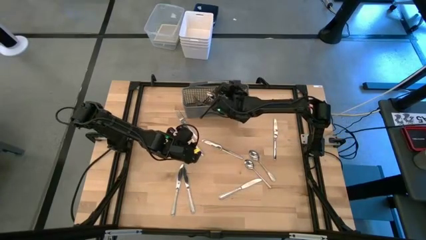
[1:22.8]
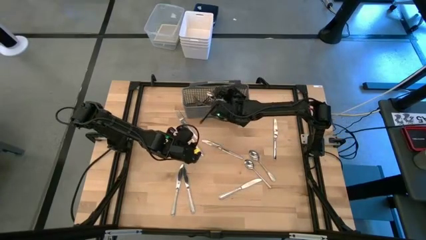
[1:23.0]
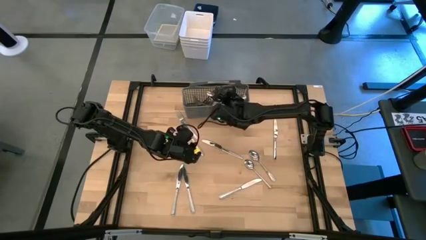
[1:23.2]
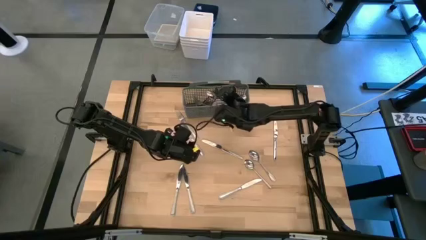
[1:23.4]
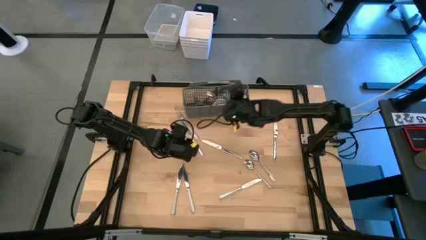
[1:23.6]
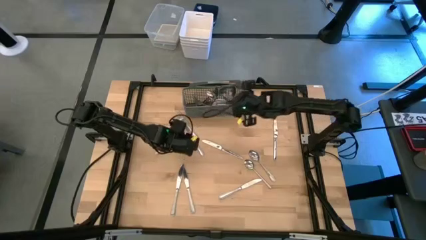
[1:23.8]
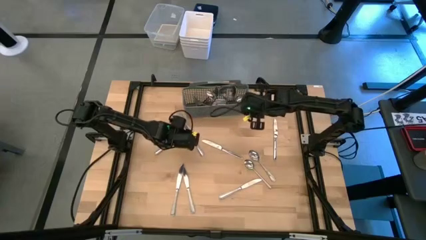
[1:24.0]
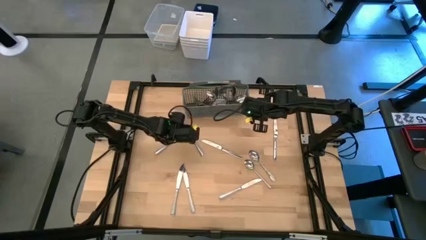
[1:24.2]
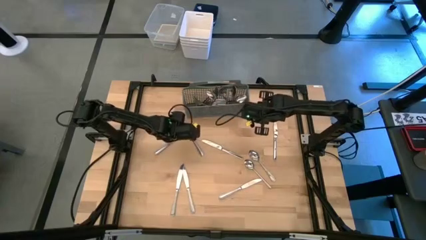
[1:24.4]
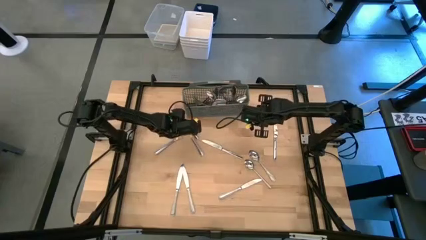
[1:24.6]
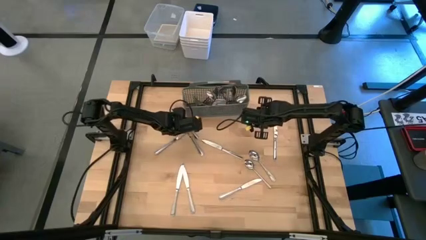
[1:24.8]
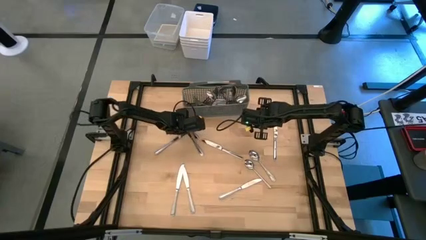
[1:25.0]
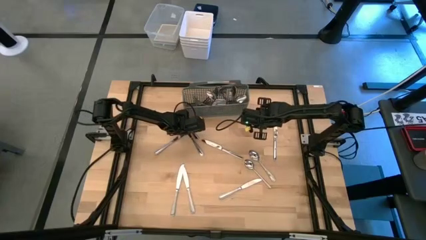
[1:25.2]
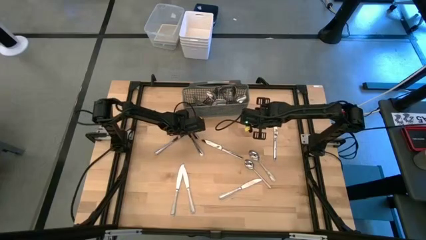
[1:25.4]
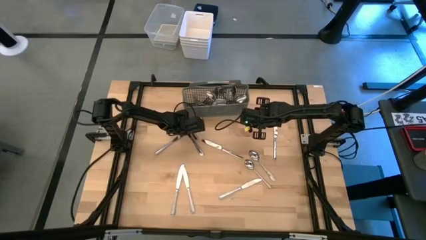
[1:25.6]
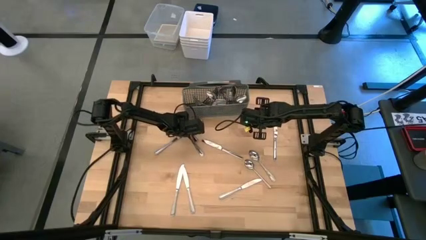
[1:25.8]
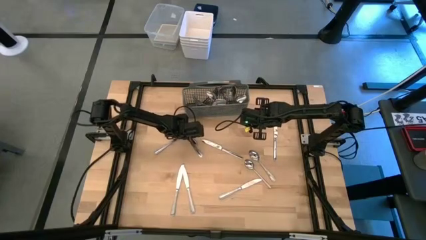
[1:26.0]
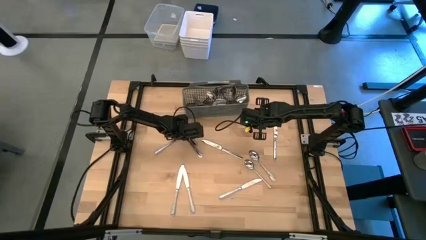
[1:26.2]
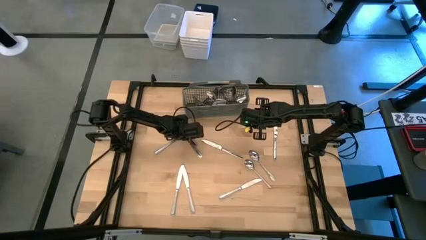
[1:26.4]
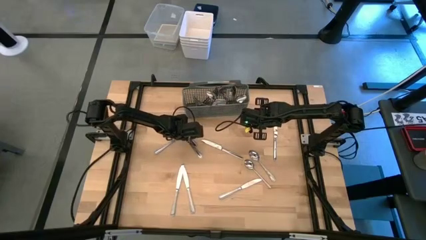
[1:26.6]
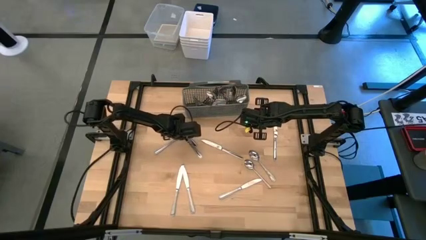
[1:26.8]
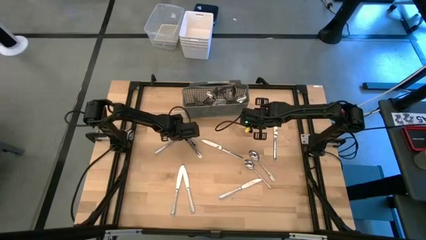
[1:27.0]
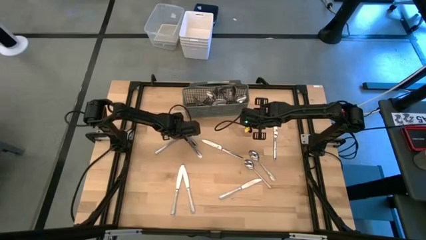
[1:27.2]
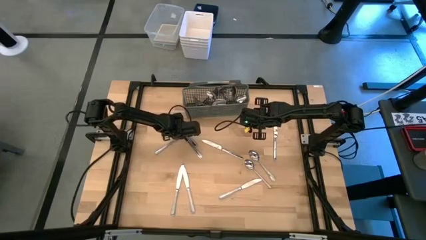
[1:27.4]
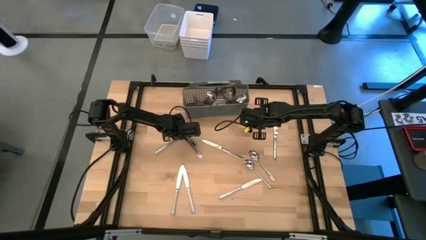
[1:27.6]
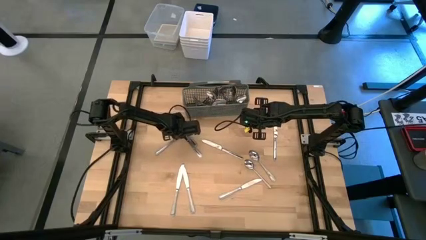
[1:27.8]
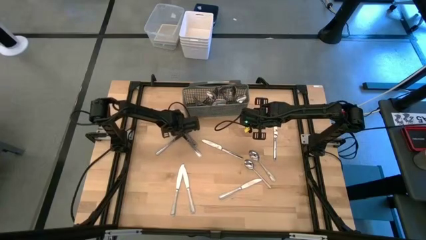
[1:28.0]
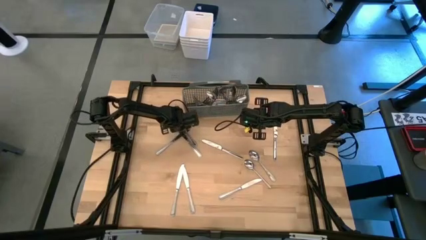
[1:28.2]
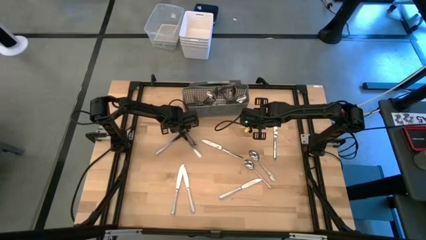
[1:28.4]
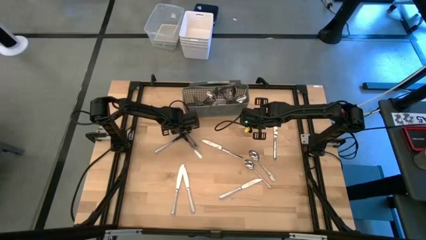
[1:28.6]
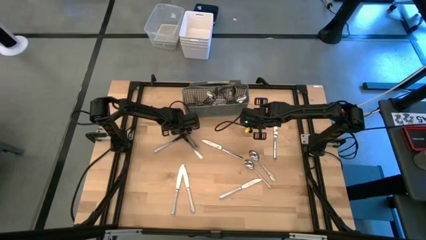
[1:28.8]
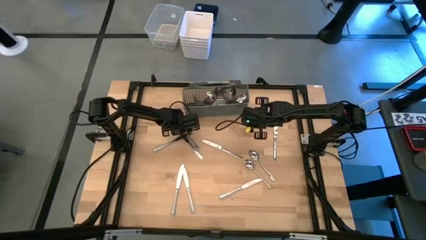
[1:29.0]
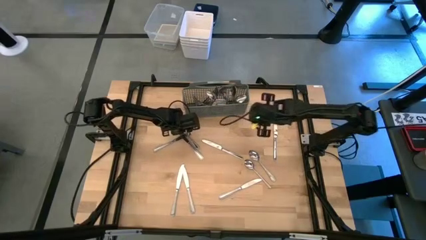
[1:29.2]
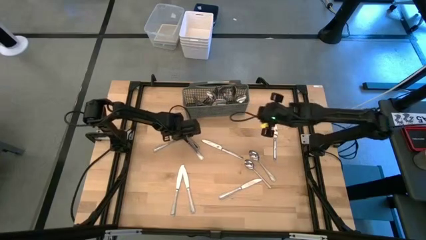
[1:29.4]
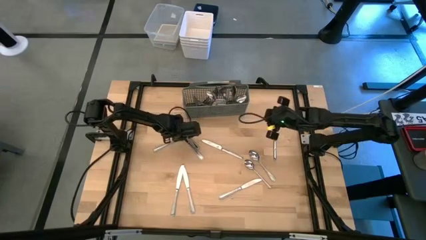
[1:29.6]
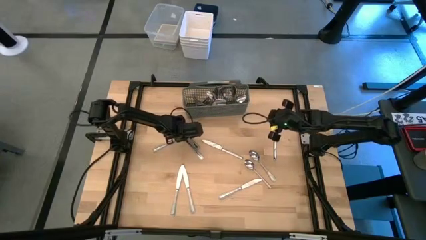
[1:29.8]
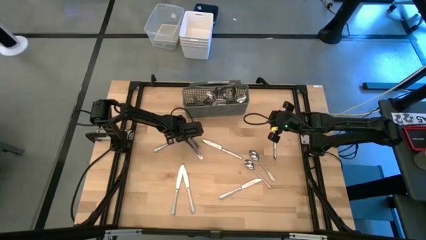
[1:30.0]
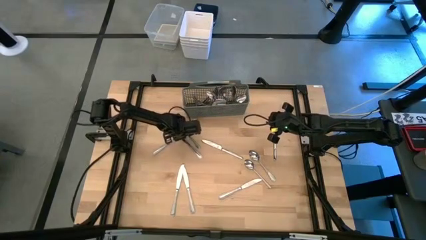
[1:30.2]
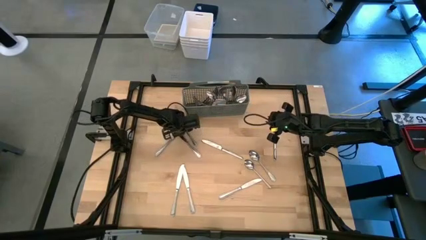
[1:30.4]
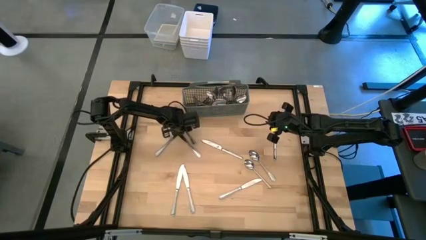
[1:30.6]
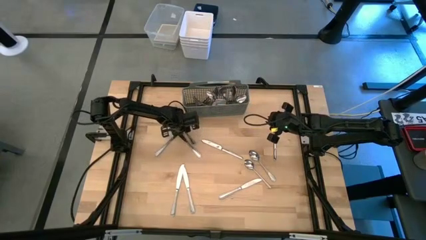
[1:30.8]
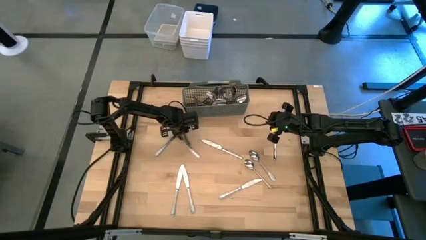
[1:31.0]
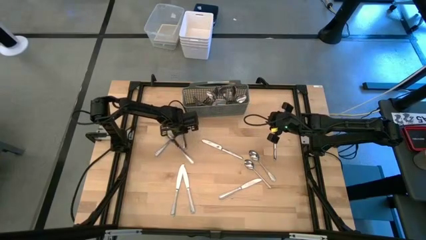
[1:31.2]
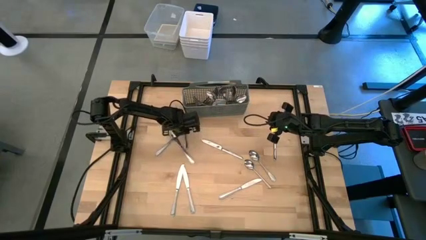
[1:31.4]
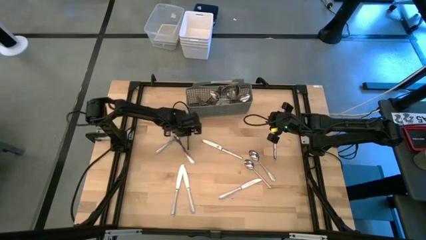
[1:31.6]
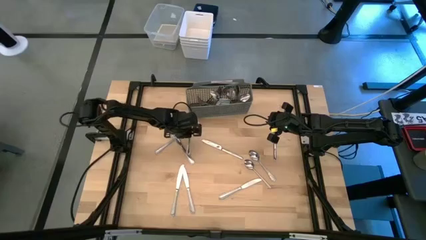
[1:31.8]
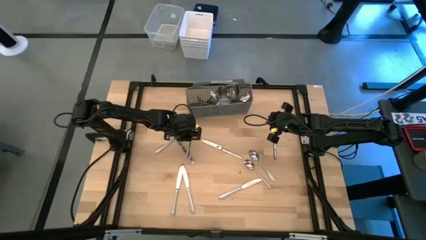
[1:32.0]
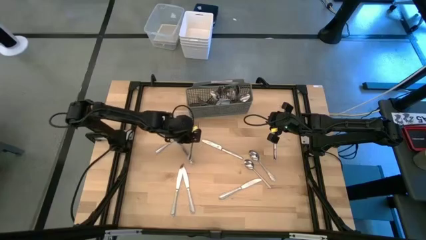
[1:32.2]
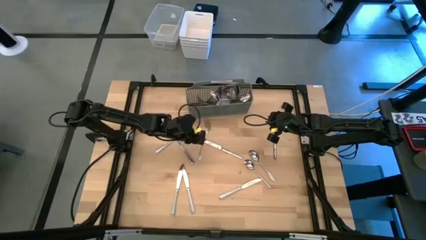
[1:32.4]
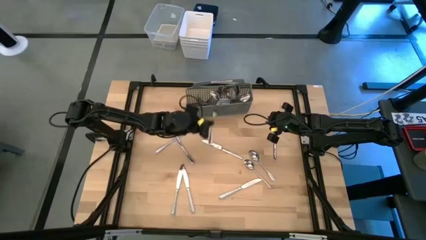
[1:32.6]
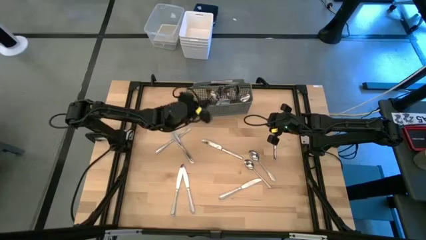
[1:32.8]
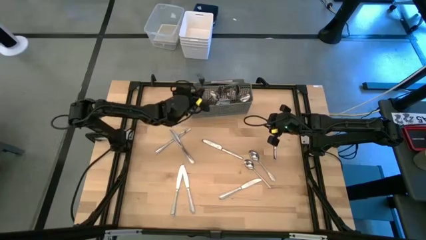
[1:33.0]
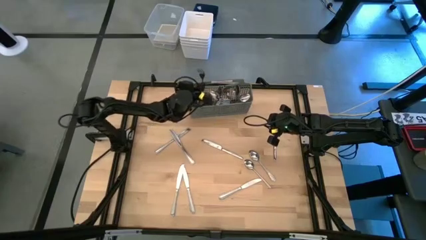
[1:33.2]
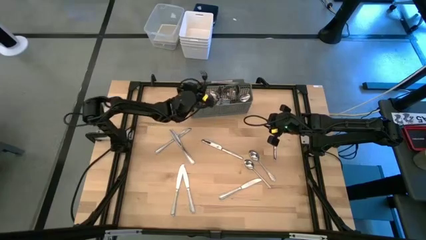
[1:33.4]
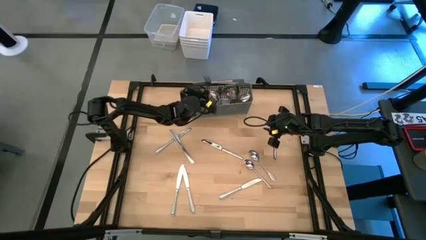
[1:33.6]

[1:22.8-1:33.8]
Task: Sort silverware
Put the silver fork into the gray silverware organizer

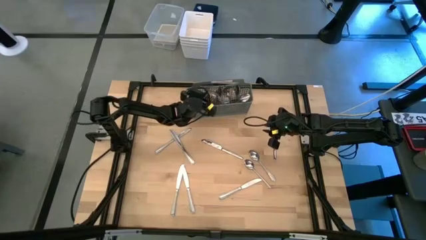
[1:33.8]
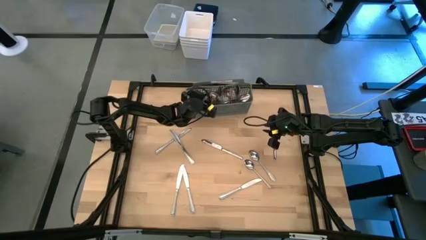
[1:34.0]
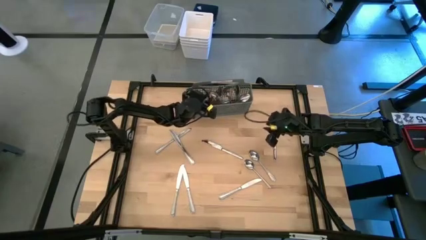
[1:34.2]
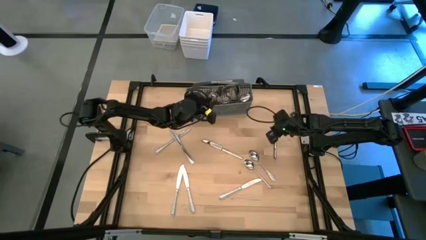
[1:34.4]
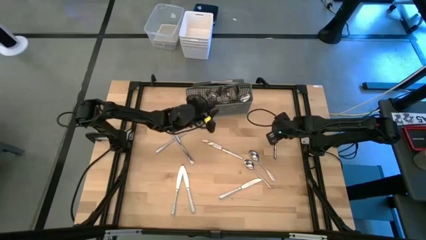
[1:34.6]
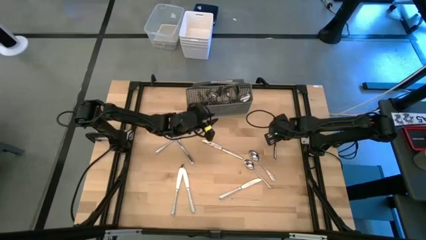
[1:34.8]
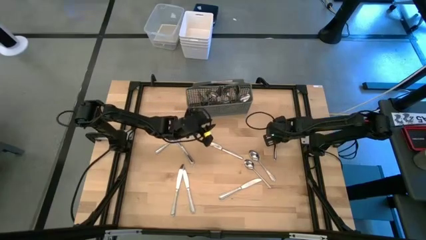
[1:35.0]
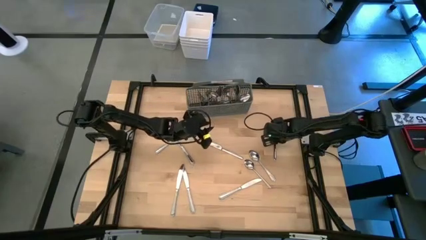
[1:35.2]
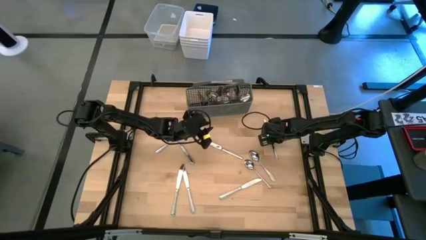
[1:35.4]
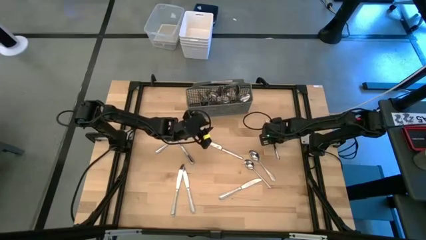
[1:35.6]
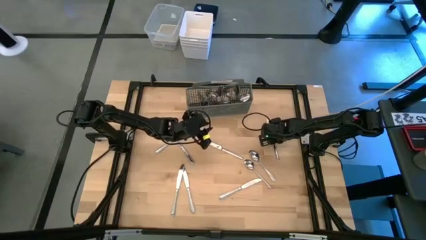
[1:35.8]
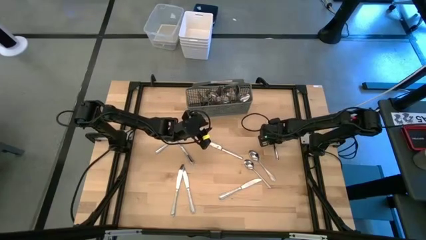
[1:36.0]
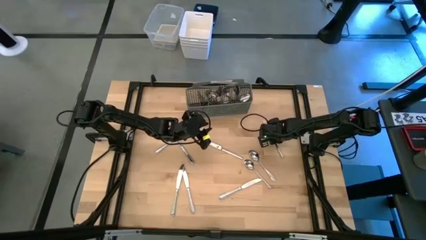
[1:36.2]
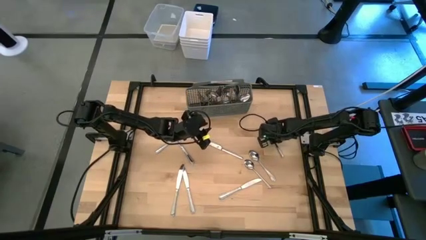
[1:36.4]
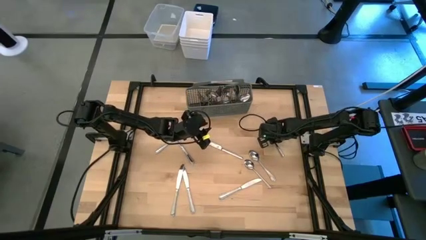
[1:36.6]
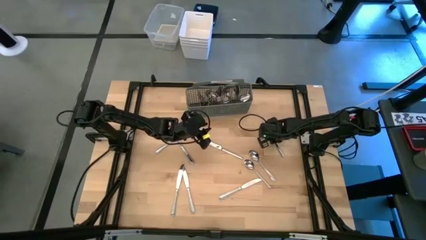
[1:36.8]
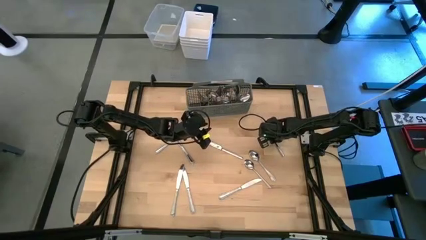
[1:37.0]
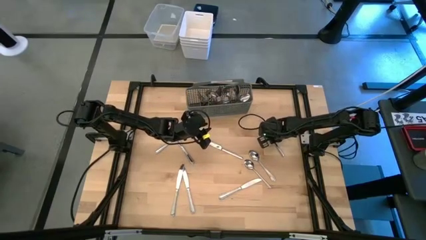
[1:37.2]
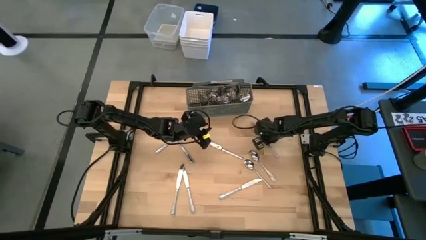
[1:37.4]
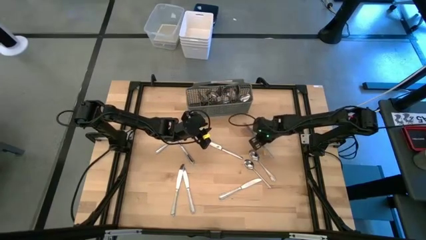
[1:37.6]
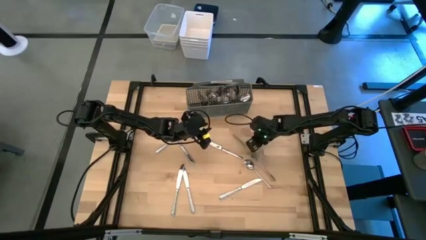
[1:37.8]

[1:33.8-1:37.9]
Put the silver table knife into the gray silverware organizer
